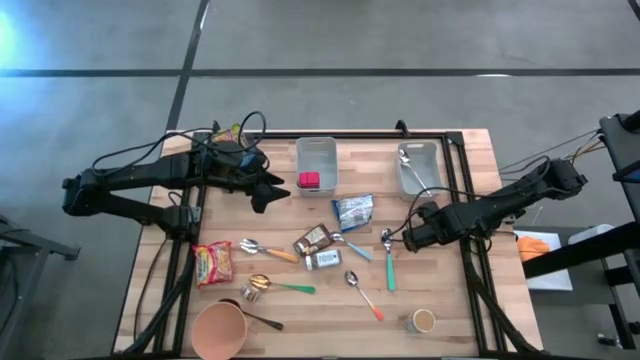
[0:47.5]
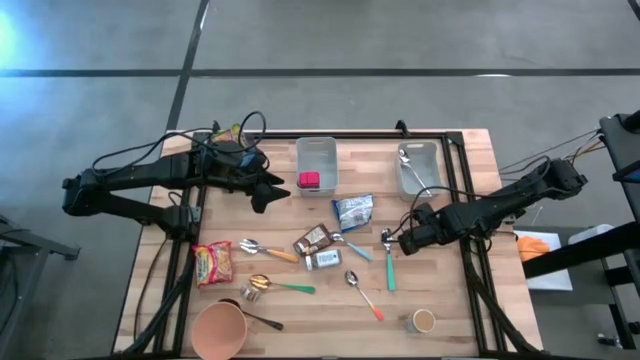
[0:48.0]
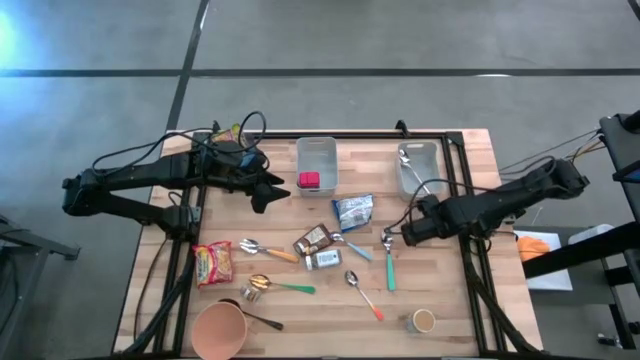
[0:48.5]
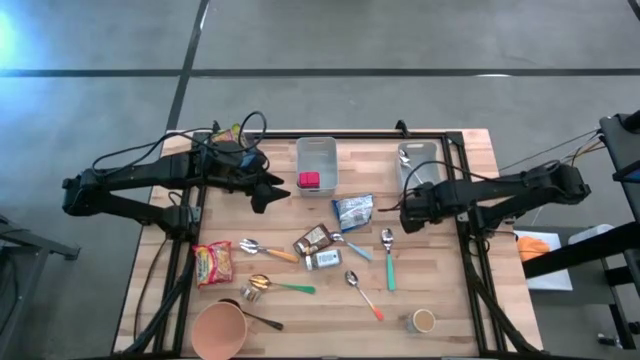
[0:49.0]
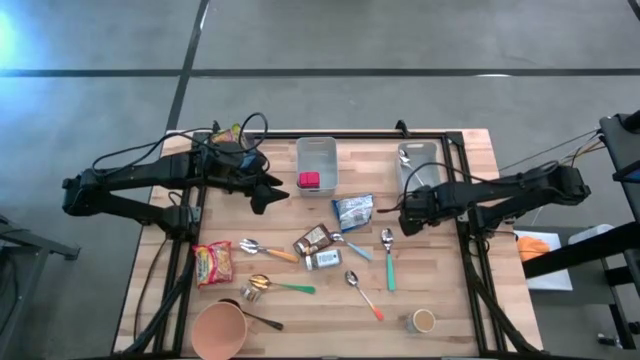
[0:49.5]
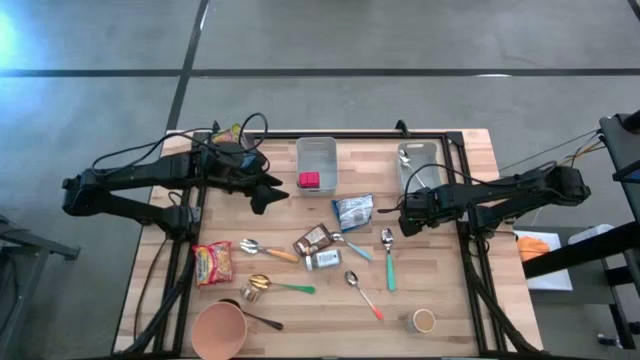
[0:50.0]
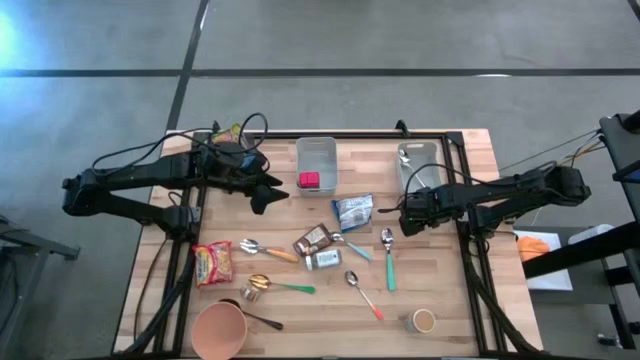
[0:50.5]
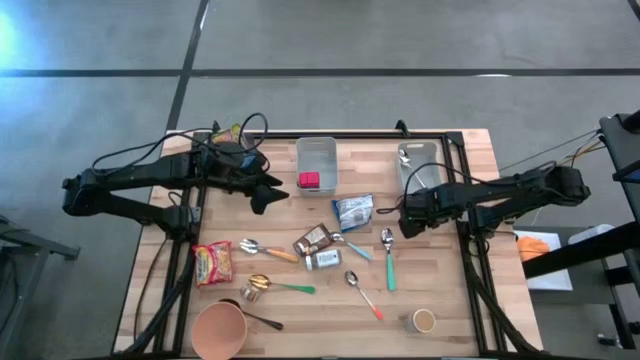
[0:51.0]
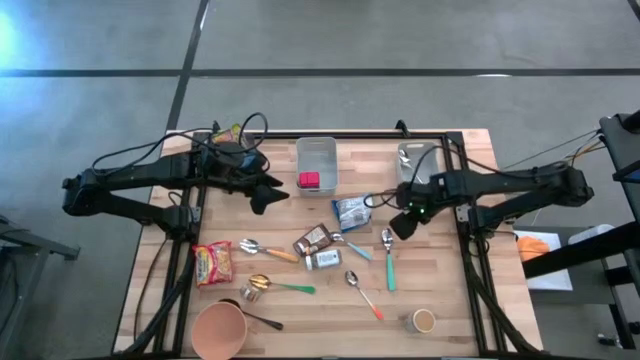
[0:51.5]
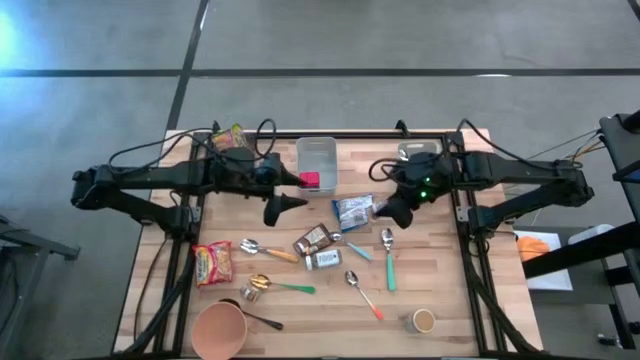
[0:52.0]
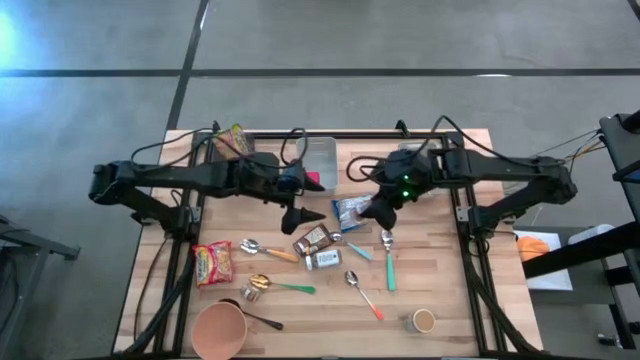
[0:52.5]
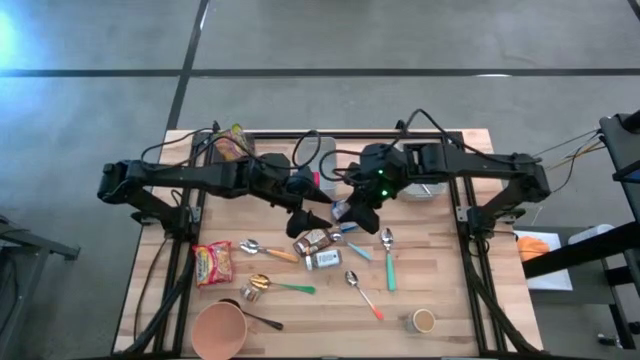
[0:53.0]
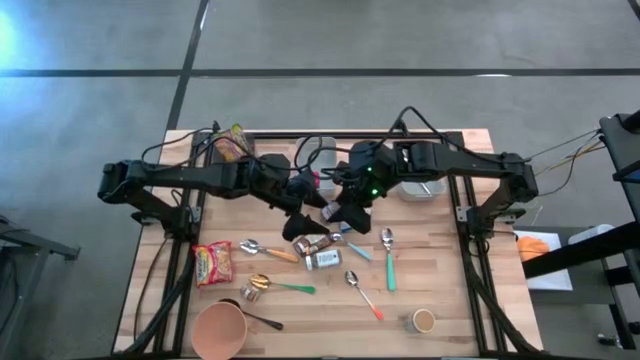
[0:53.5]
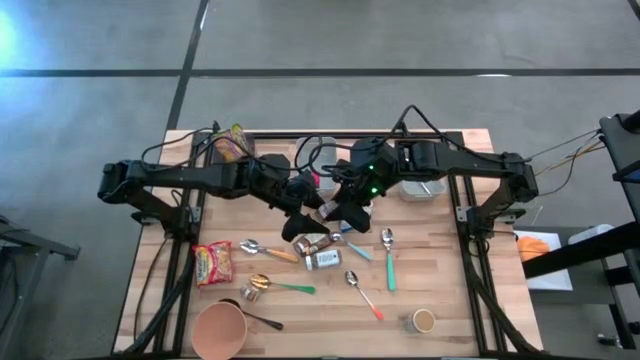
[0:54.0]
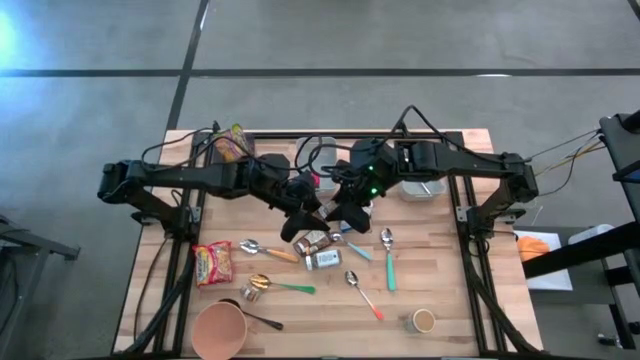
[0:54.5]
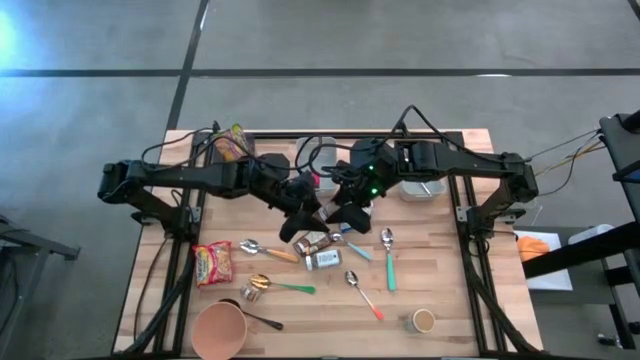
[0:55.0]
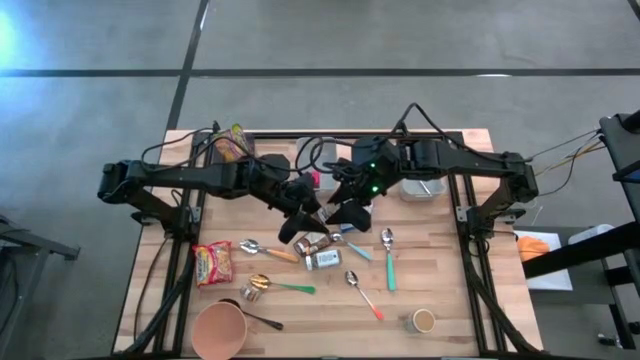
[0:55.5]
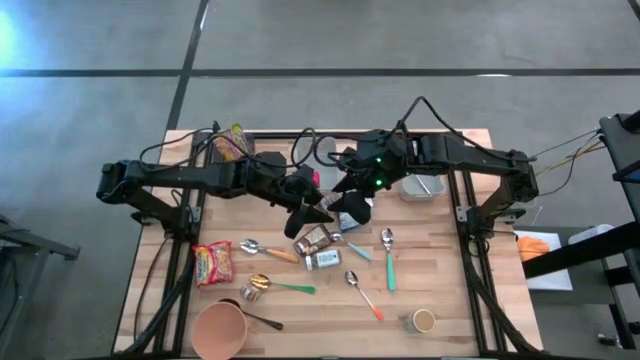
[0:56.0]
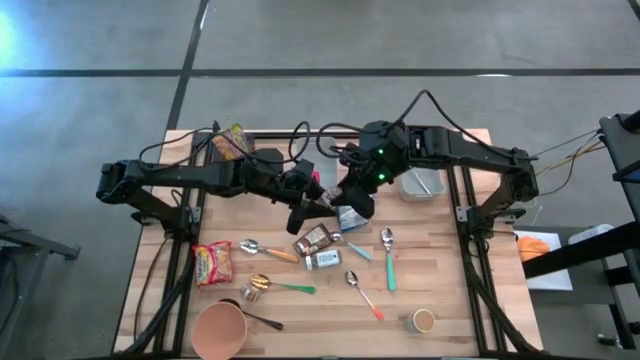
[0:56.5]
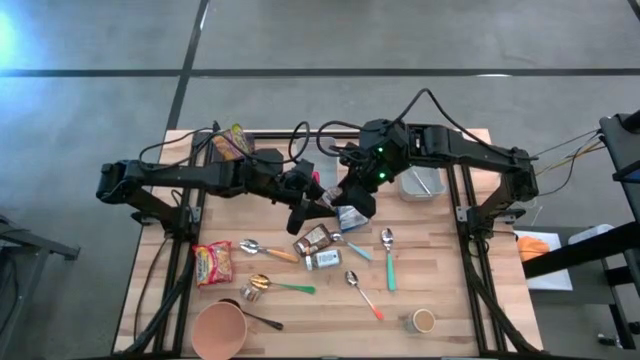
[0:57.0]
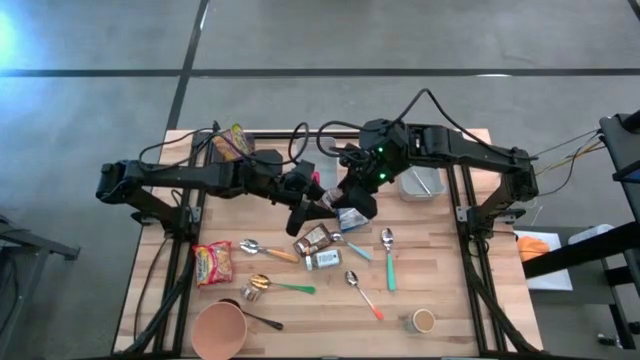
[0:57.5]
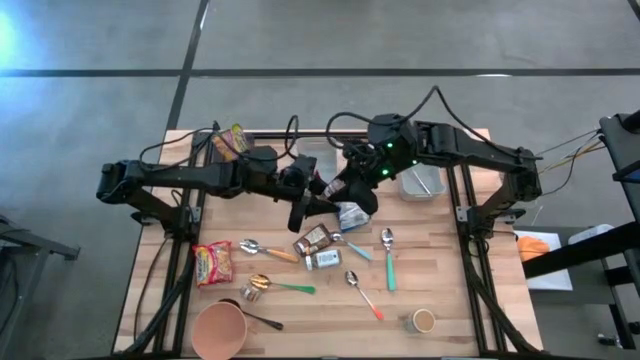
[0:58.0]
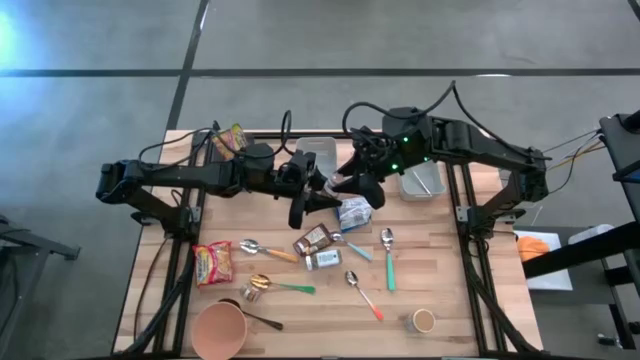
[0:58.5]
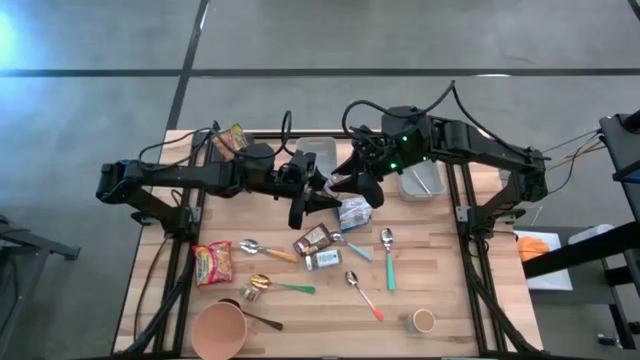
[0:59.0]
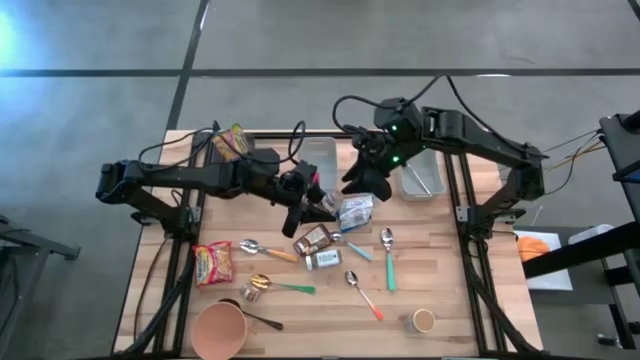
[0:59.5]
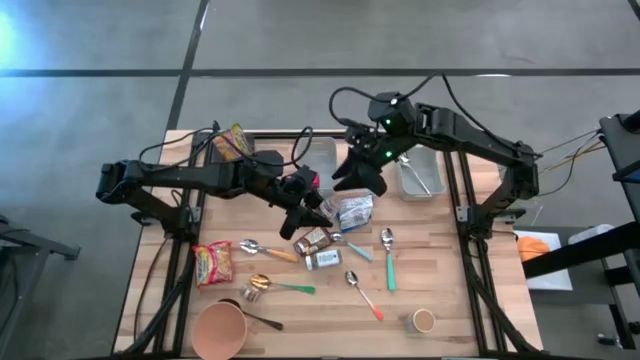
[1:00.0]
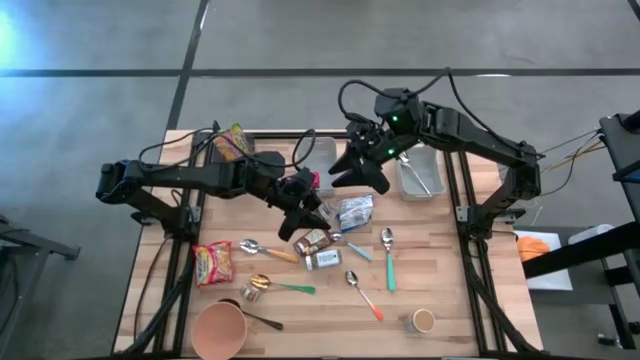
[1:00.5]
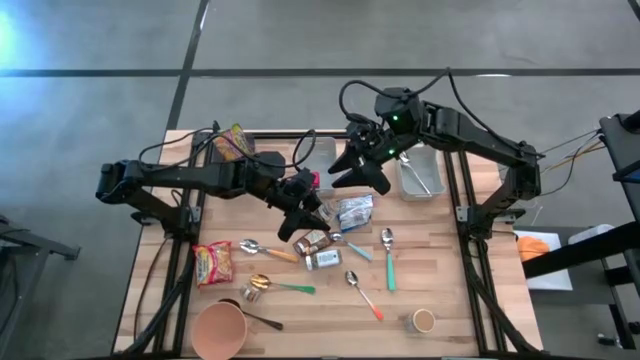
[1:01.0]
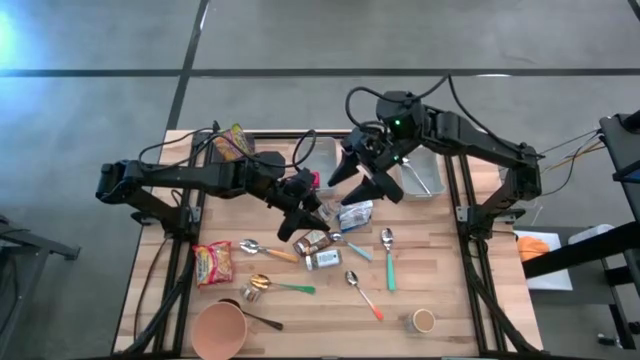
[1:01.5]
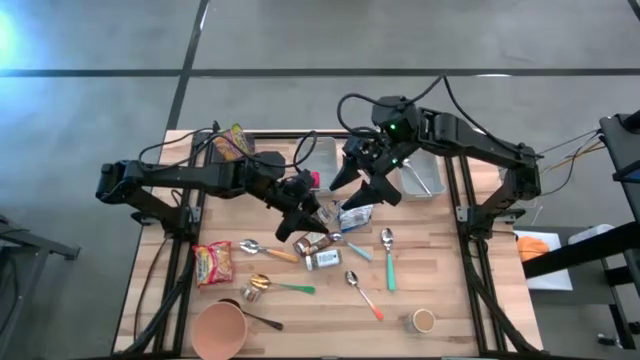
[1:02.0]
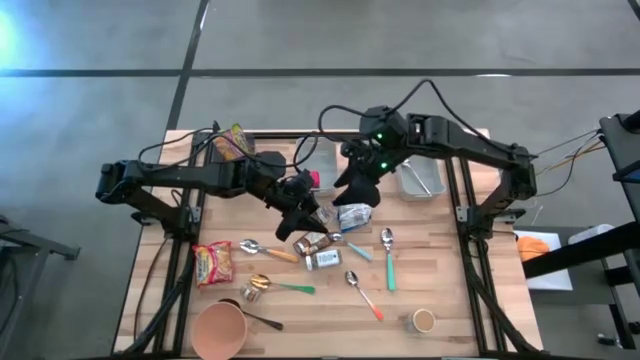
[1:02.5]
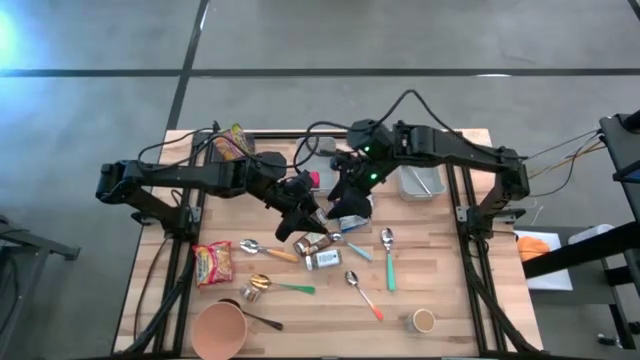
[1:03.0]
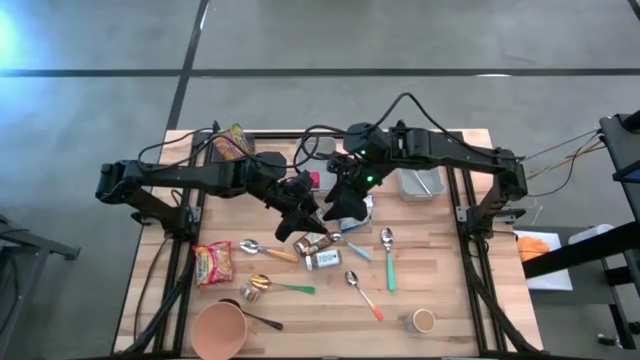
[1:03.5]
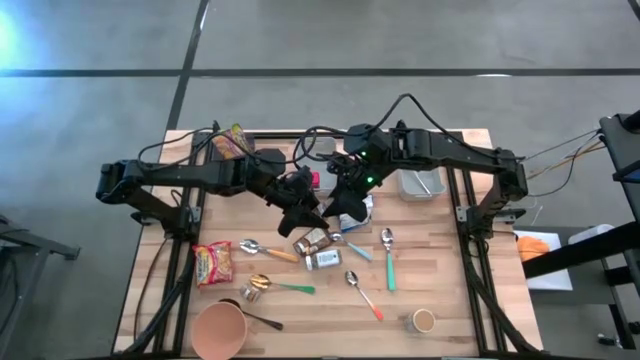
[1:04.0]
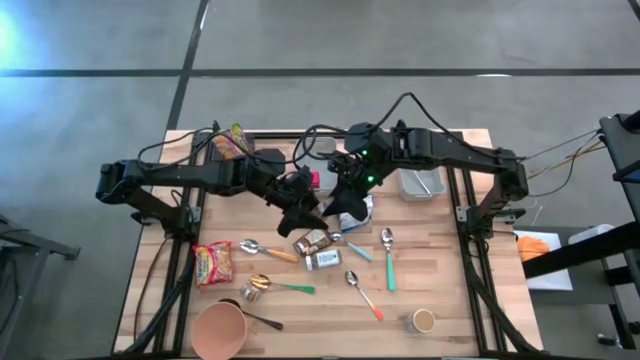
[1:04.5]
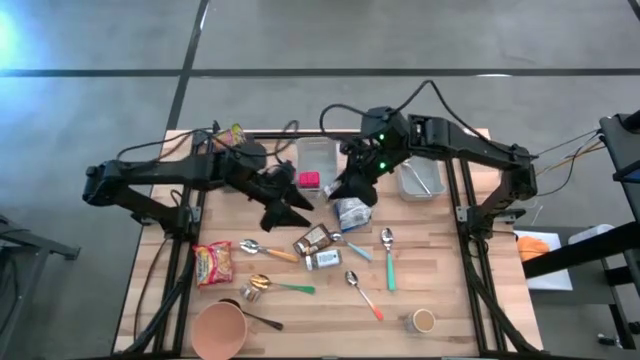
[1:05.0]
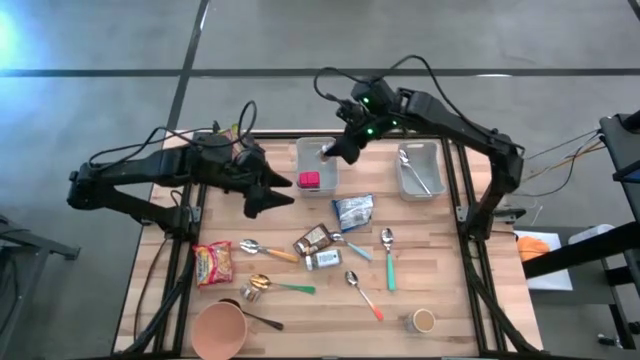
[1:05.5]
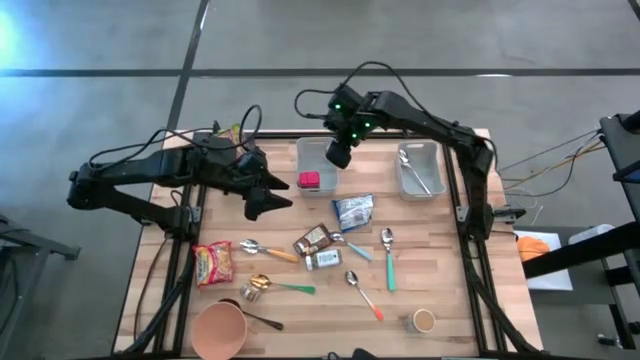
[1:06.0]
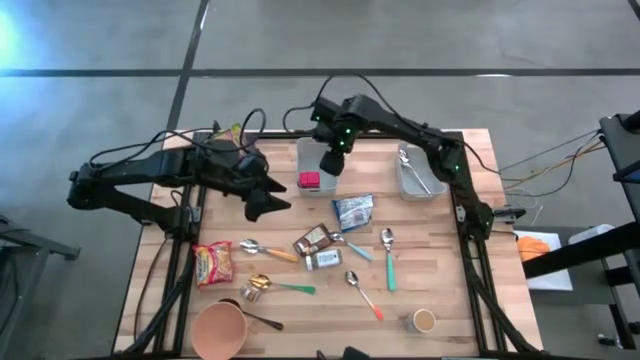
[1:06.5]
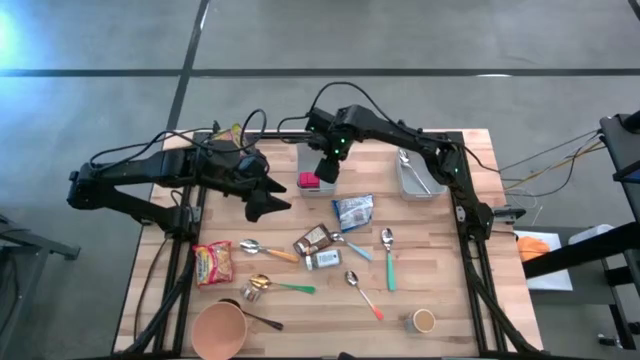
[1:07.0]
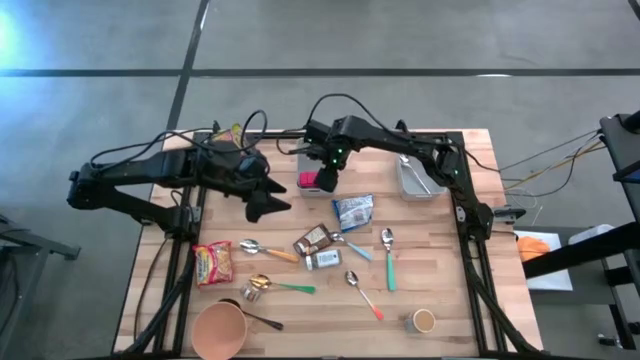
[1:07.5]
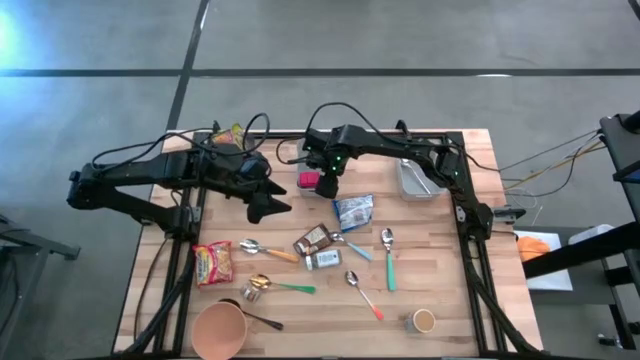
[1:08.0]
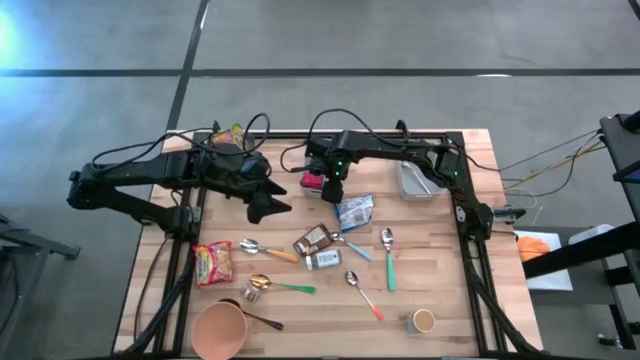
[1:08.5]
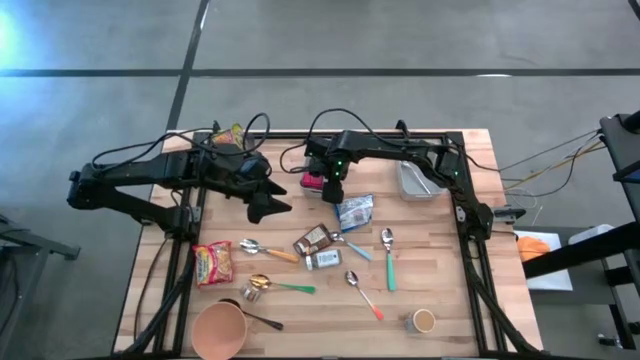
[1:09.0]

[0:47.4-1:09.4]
Put the right brown seasoning bottle into the left gray bin
